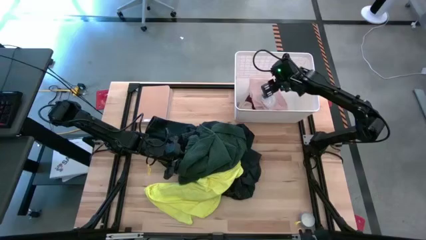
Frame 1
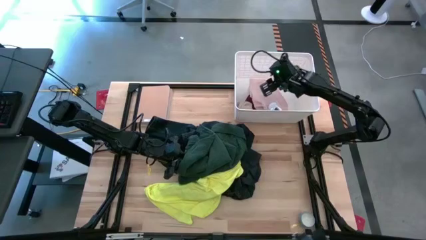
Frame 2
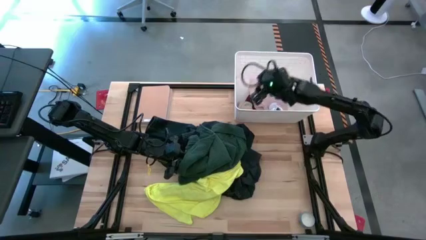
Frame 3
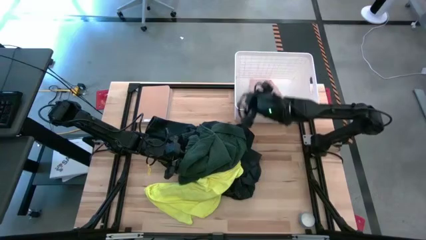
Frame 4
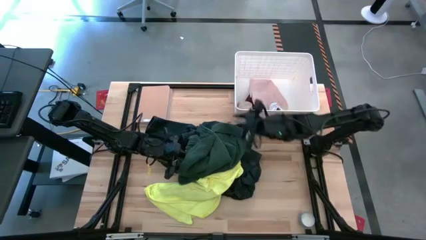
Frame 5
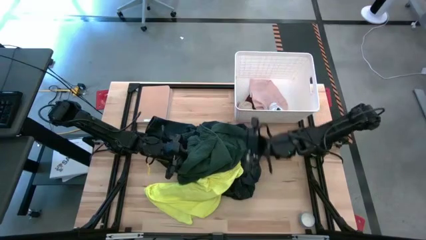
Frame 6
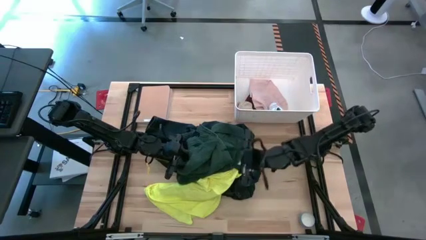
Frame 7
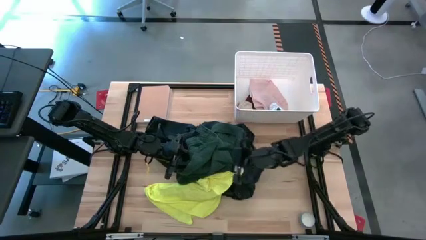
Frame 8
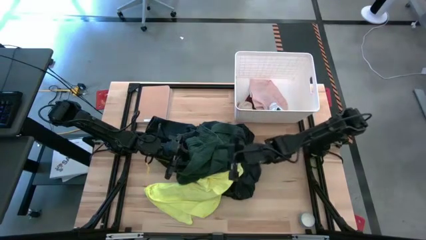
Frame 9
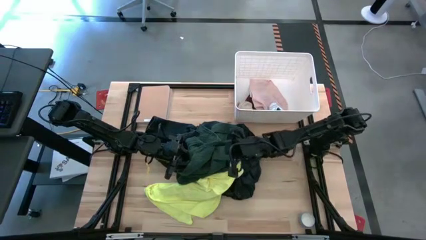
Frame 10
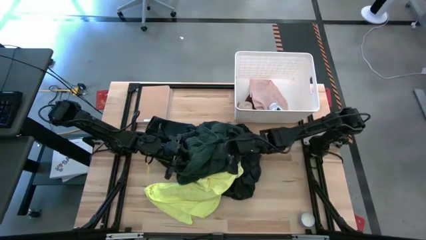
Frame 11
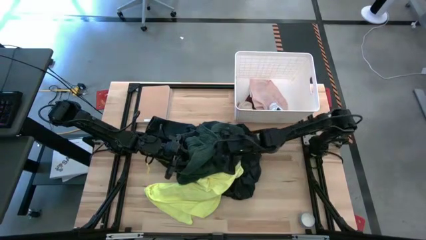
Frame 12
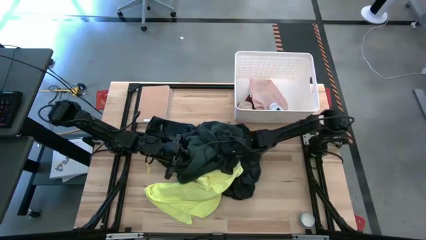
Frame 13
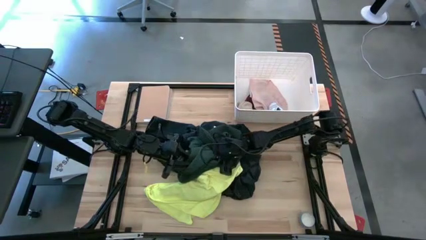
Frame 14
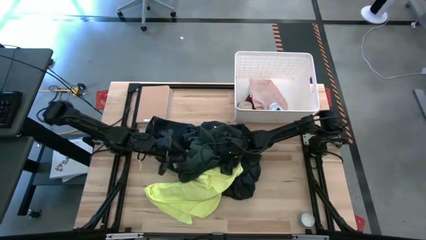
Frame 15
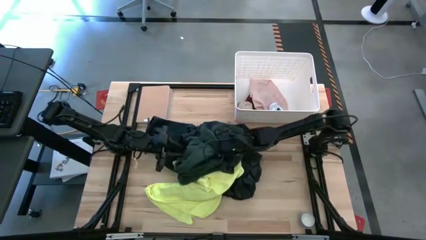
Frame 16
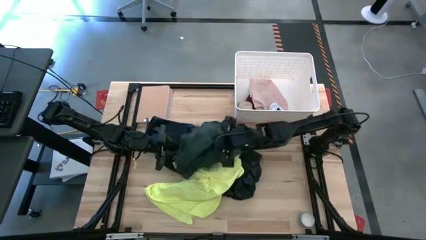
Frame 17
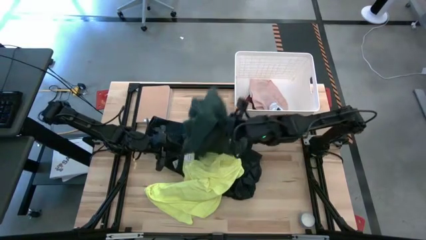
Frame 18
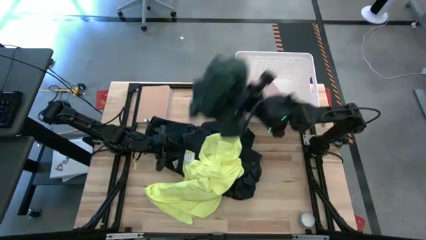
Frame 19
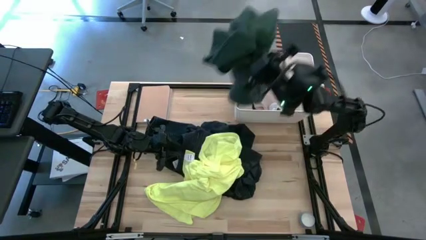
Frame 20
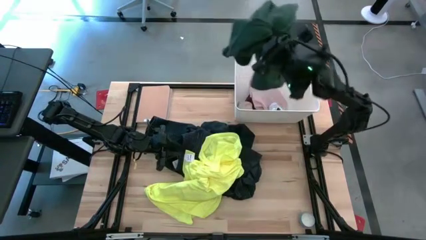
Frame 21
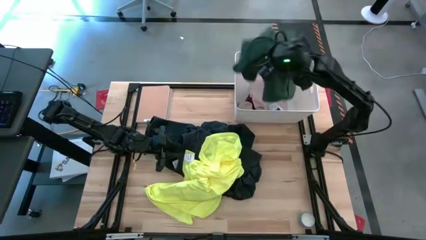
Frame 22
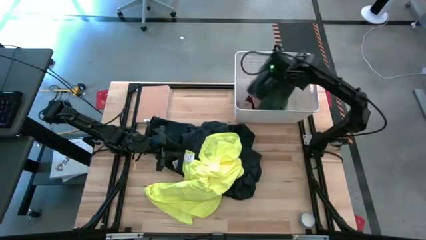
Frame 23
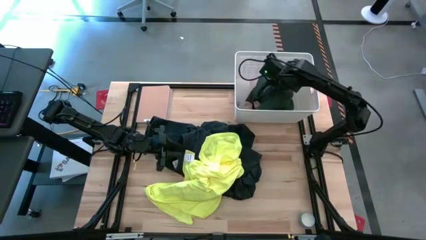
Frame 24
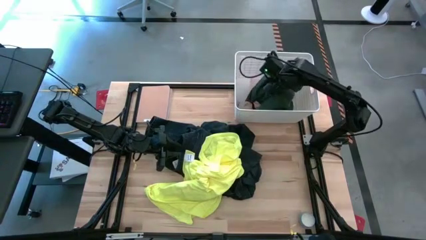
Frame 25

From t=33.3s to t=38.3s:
Task: Sort clothes
Put the green shirt into the white laundry bin

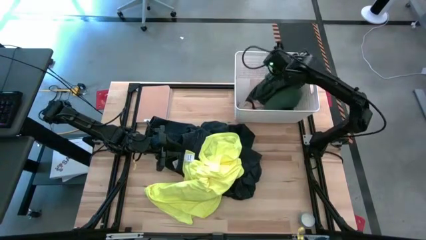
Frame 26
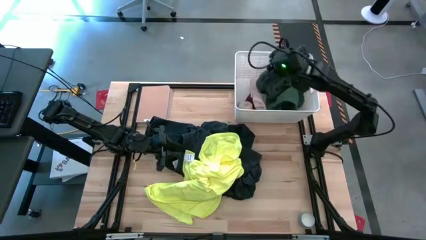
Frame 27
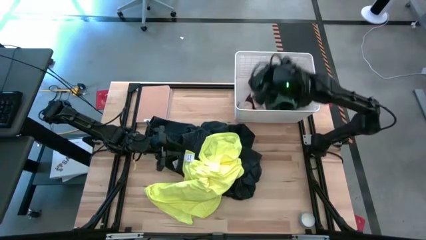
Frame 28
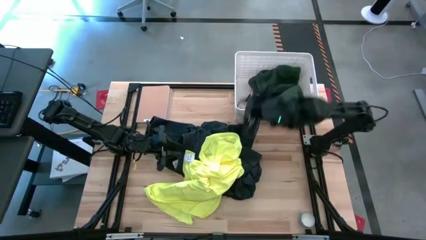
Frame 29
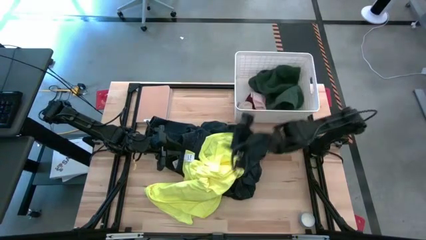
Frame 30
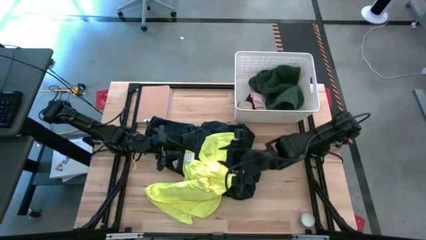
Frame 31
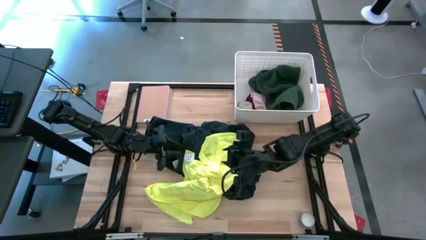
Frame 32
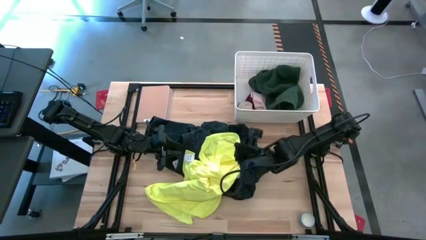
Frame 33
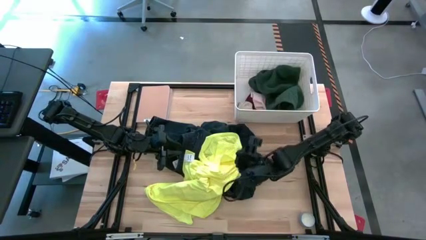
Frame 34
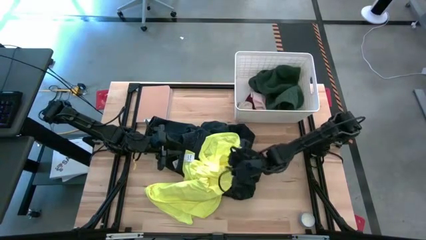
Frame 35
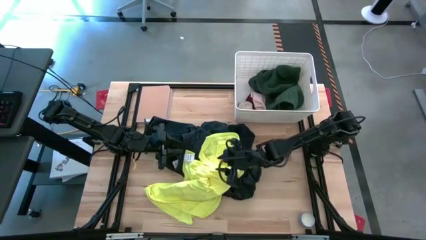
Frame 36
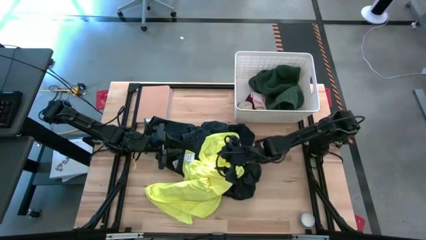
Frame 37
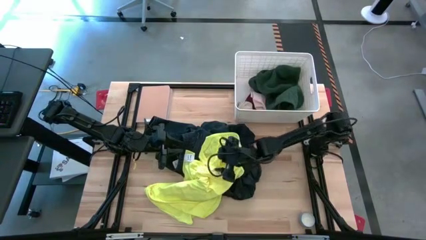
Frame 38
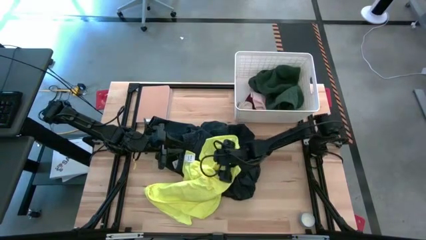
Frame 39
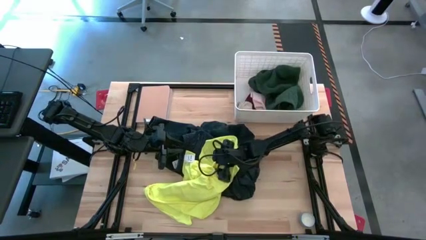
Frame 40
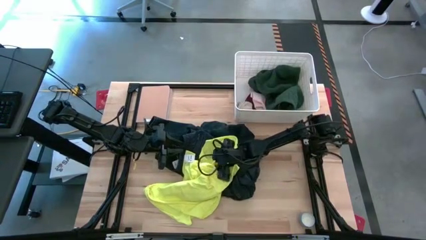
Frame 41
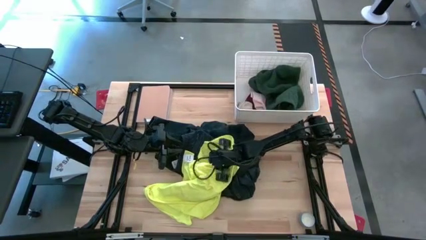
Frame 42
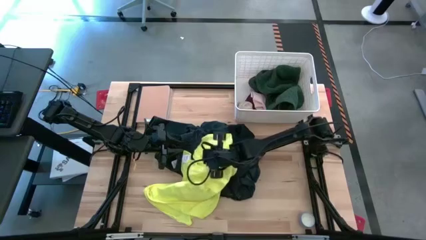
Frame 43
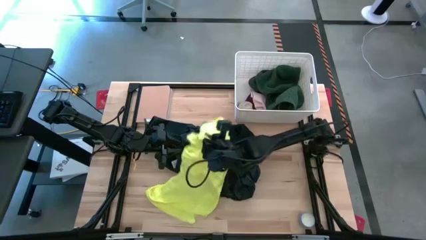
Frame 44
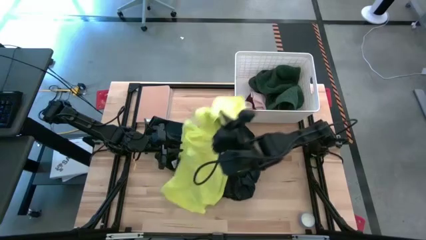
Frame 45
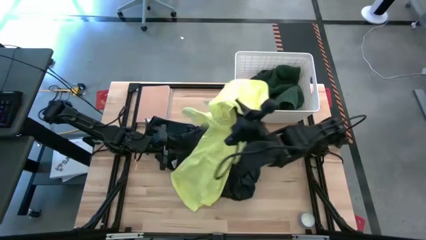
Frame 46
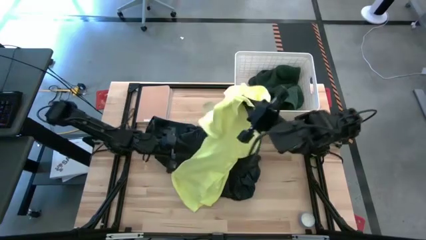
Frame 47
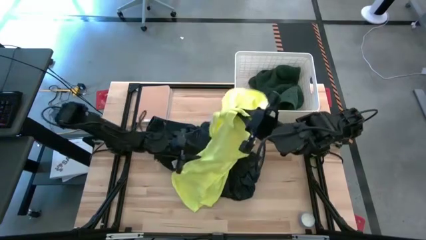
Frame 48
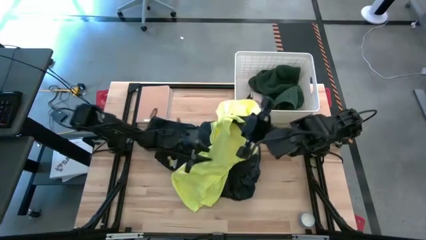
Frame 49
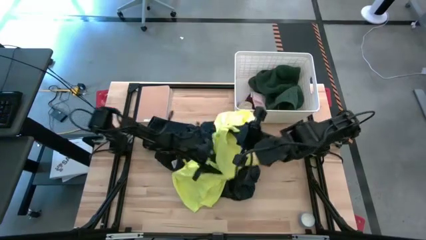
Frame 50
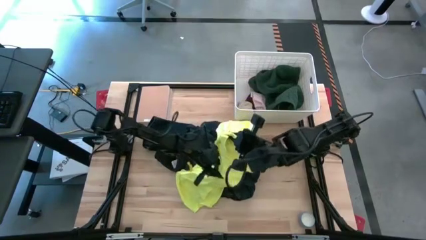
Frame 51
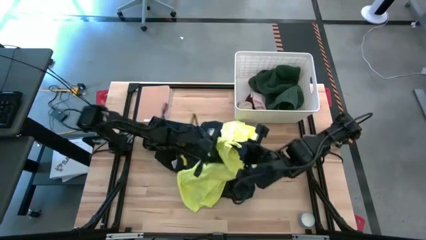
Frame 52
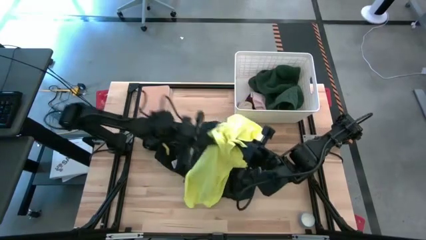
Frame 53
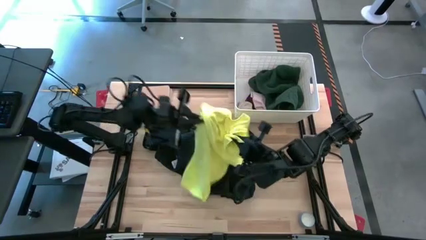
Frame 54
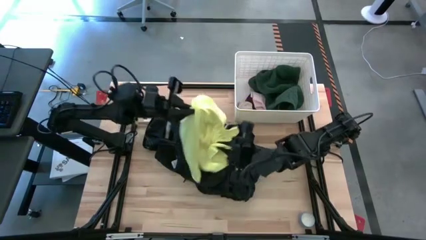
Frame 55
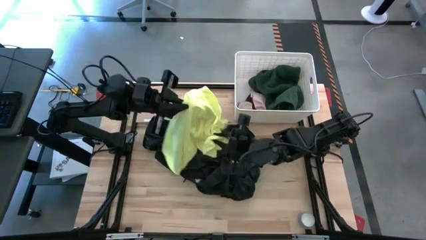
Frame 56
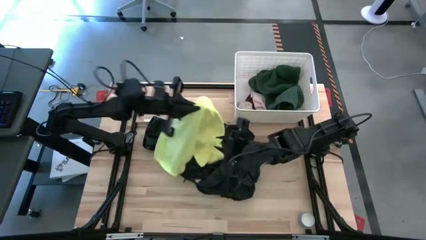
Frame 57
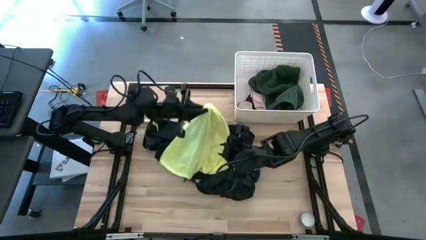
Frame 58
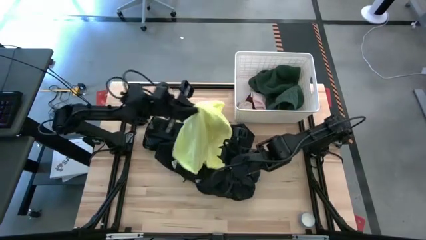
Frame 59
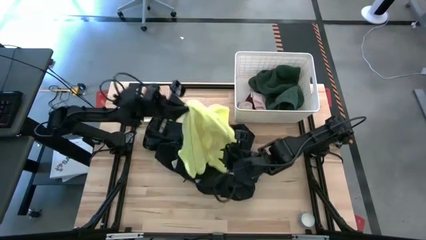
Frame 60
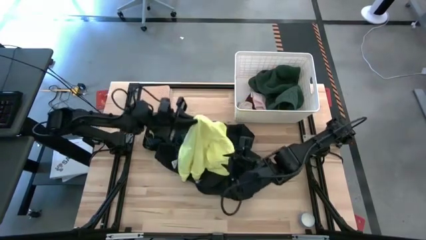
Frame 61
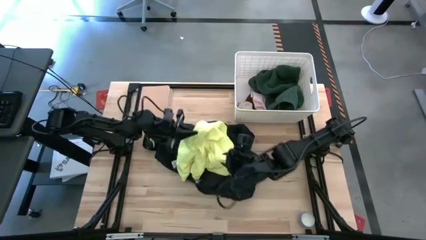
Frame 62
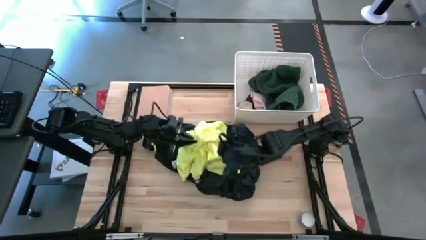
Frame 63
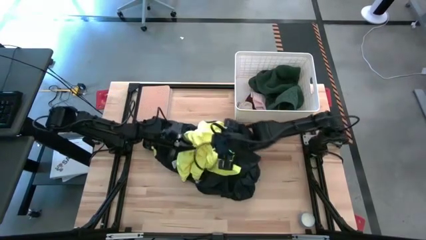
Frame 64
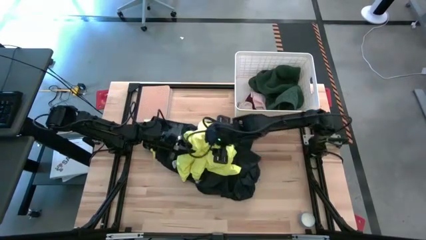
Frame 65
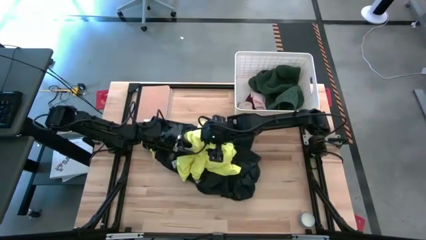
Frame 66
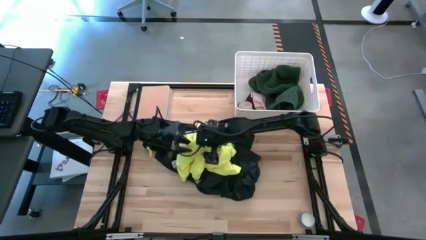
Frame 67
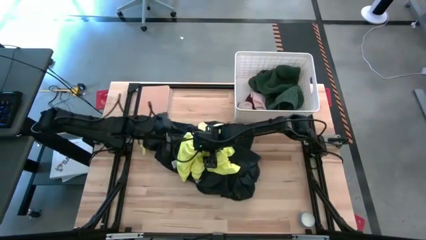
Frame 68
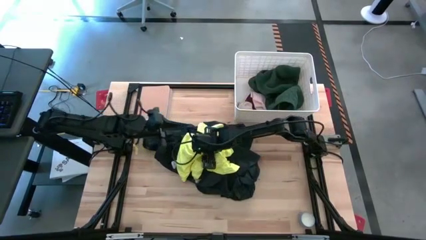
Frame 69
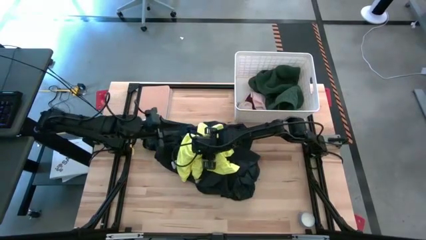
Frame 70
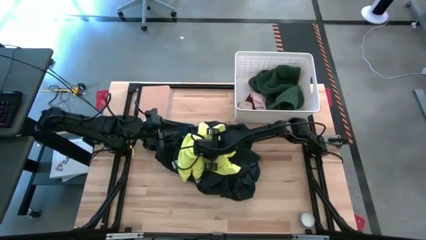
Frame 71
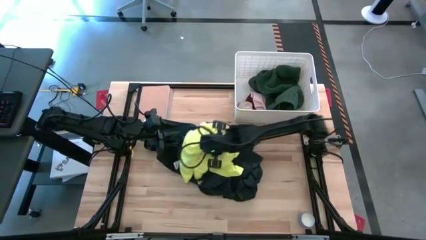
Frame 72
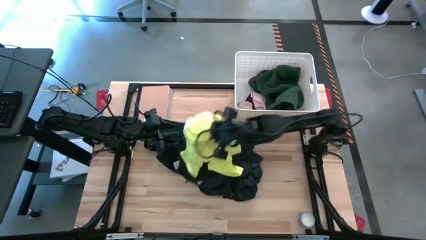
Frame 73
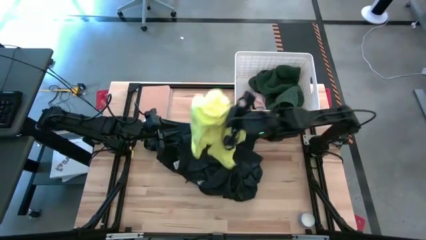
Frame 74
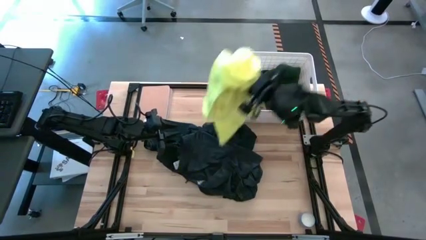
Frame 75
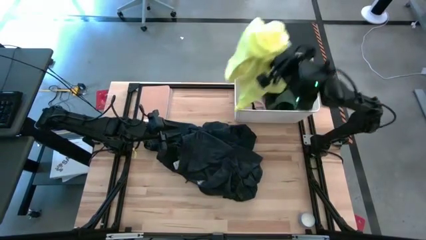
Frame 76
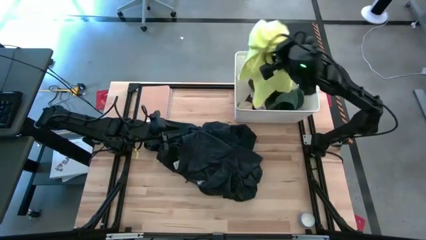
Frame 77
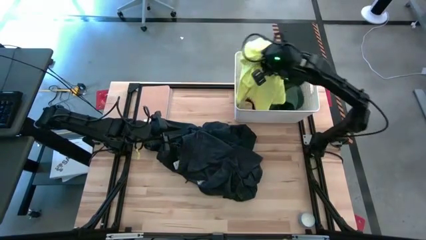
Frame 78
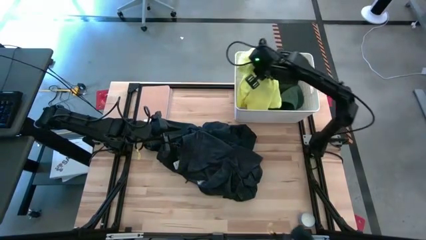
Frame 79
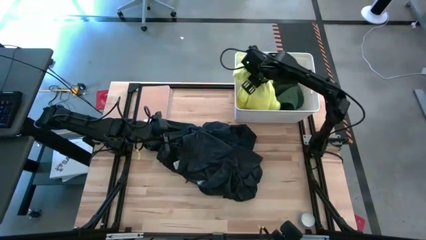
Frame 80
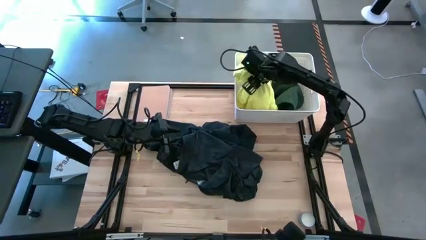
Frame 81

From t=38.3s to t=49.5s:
Put the yellow shirt into the white laundry bin
